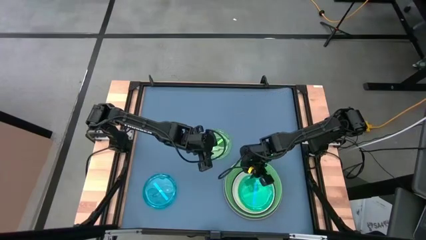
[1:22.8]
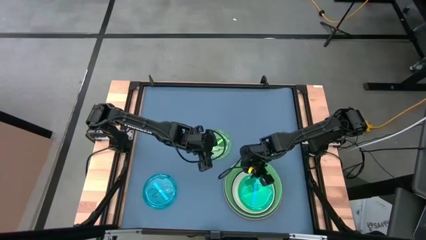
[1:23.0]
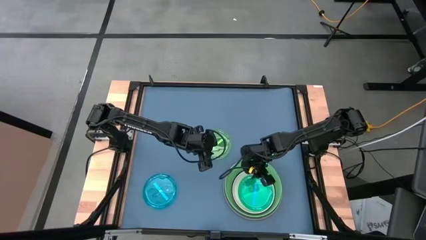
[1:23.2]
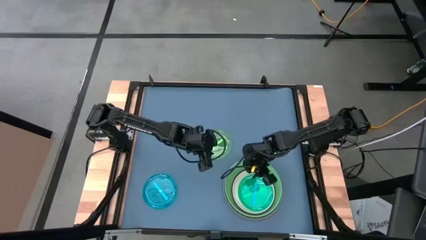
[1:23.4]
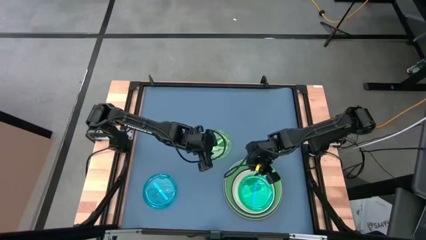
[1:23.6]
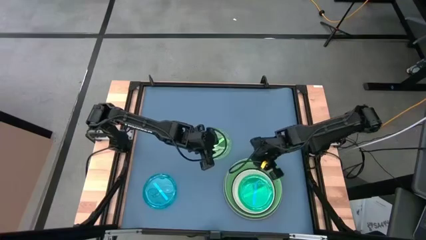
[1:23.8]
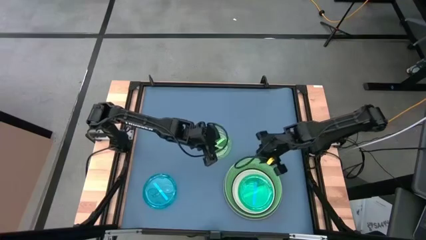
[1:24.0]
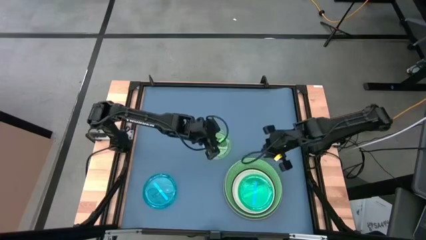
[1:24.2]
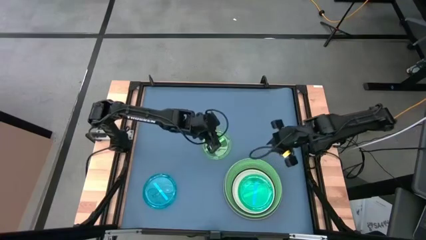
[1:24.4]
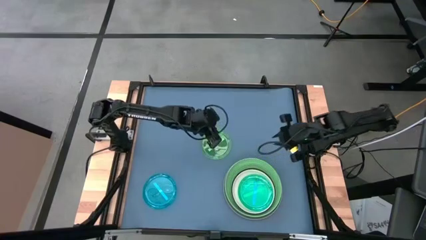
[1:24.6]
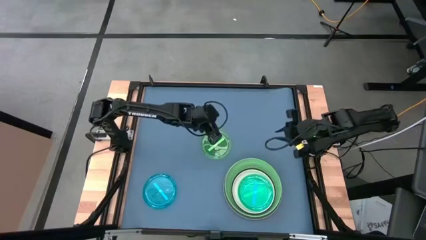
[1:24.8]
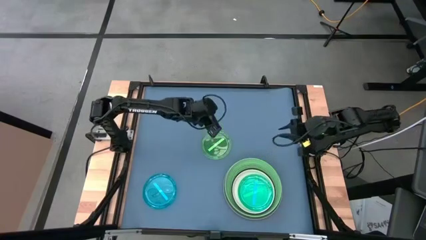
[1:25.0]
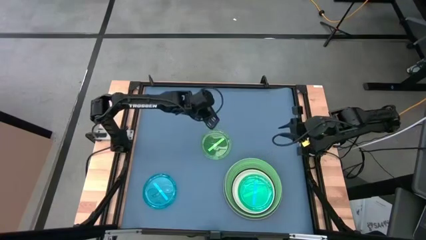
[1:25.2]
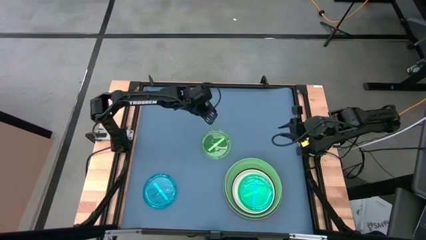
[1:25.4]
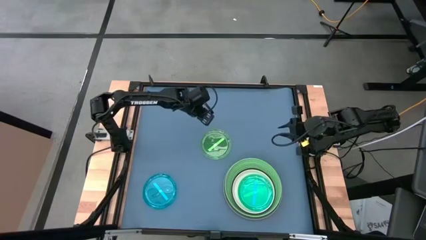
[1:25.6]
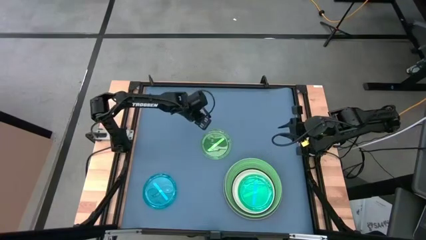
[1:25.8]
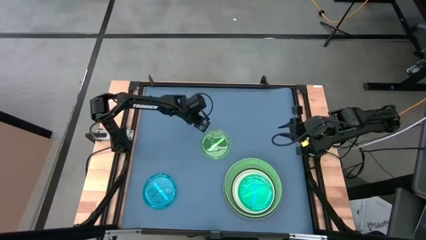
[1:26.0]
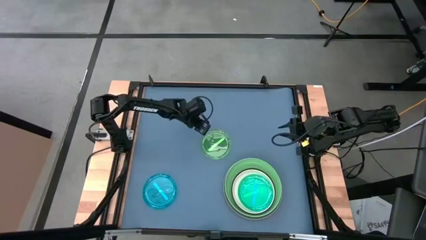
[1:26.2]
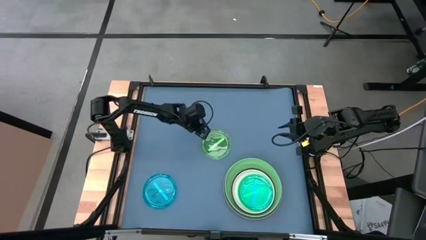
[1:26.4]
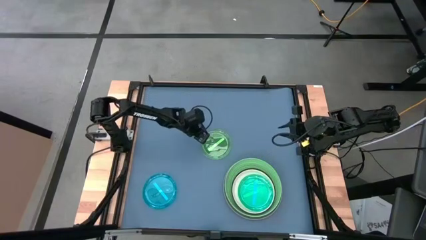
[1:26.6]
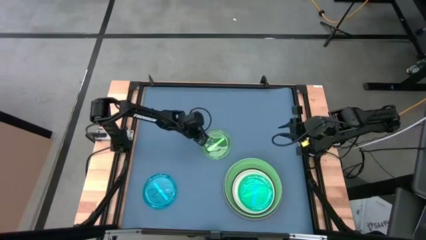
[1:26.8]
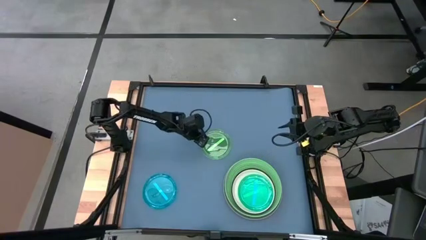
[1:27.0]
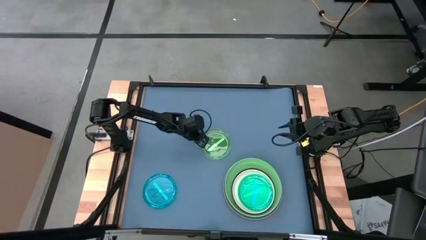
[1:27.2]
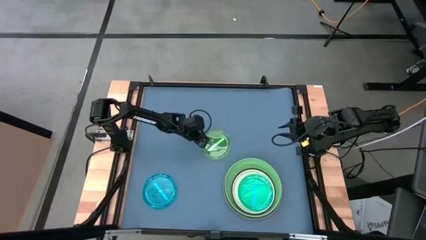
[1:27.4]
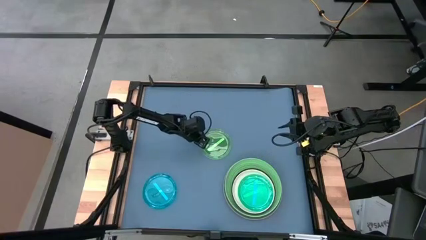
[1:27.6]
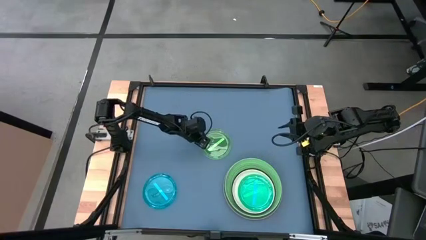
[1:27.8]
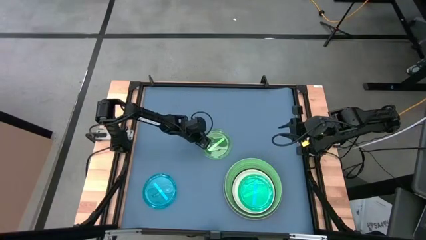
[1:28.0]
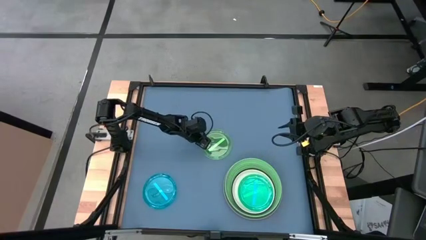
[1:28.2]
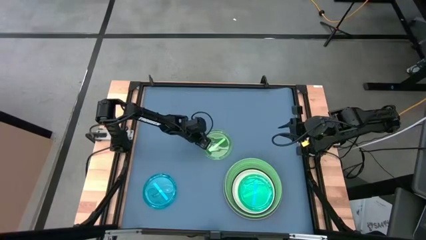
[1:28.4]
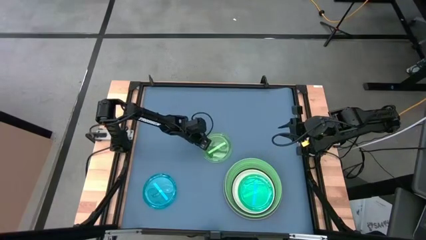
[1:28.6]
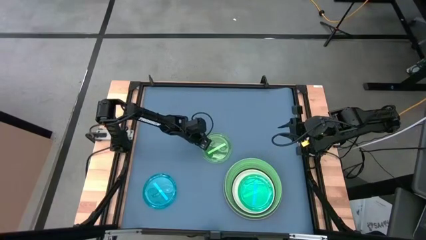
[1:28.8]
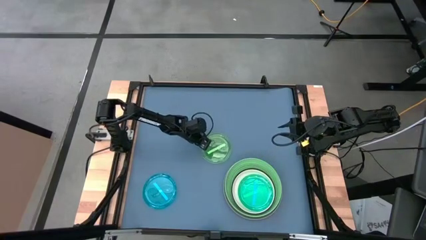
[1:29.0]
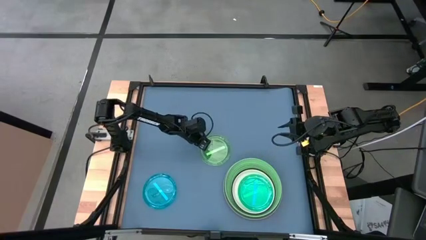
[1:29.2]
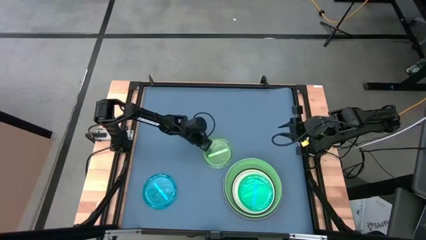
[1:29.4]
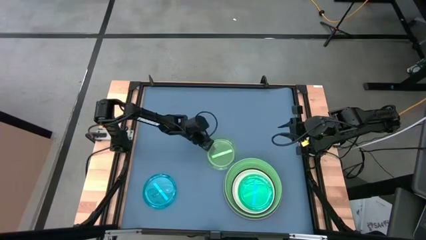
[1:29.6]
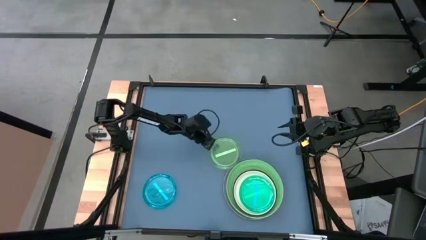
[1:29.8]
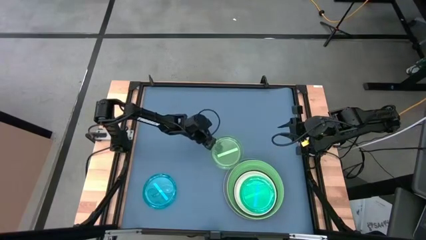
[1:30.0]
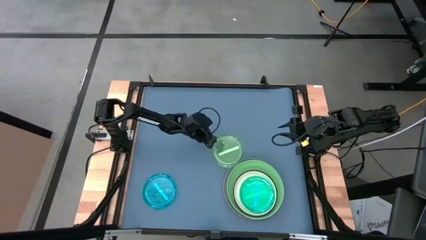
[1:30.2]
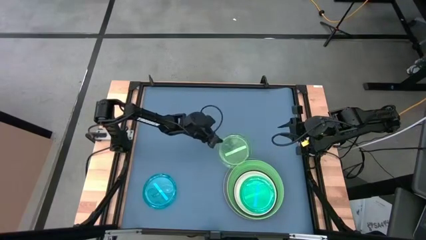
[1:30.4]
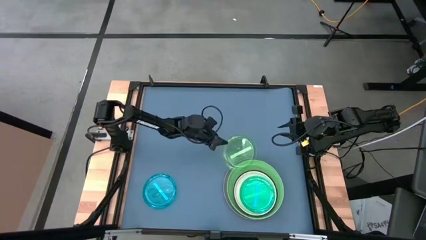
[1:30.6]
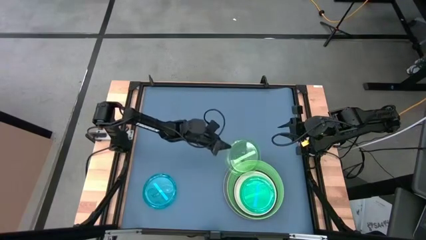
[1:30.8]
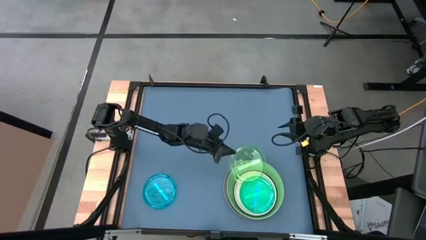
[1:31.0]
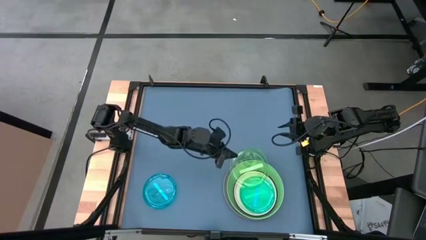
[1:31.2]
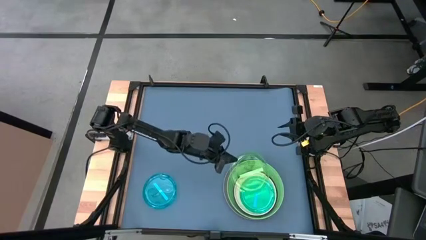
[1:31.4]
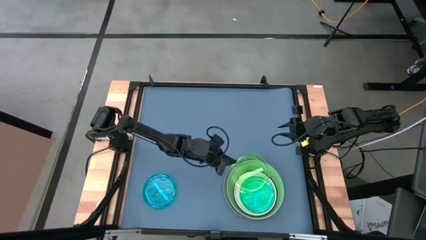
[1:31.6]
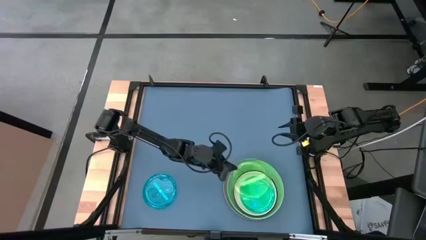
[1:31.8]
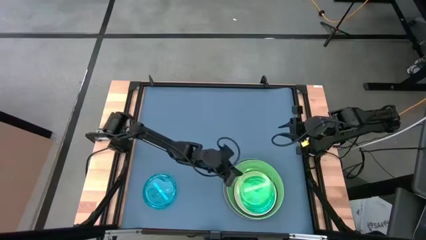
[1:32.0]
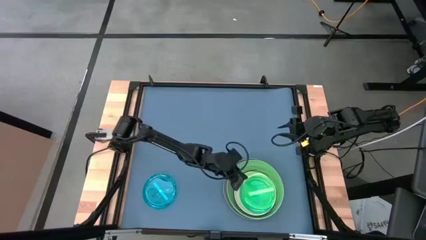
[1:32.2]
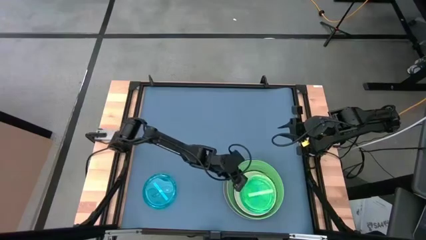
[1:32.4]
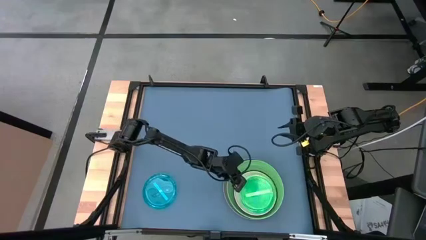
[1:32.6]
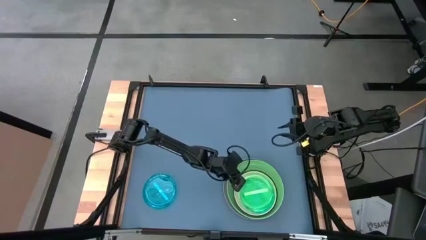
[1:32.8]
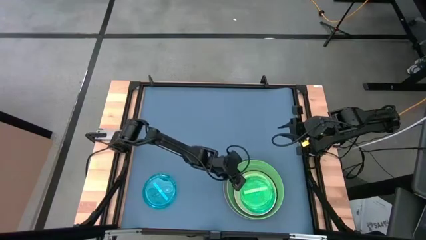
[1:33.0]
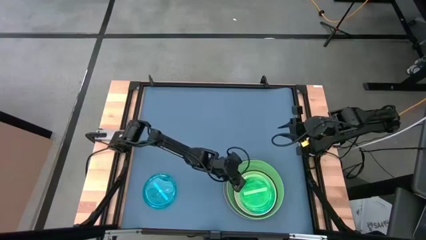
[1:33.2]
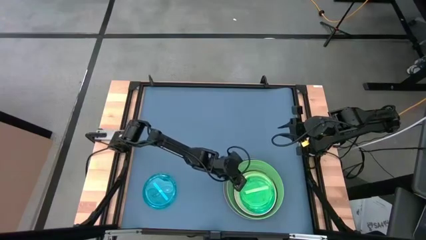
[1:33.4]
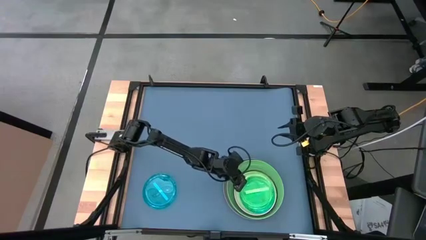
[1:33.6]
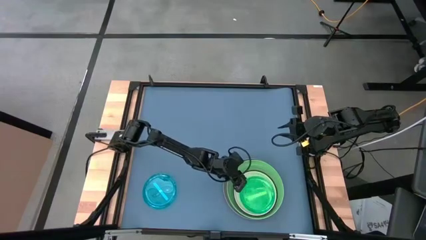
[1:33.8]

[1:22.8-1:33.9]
Task: Stack plastic plates
Stack the small green plate on top of the blue plate

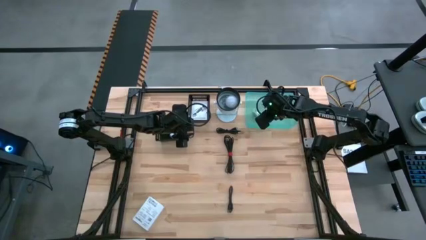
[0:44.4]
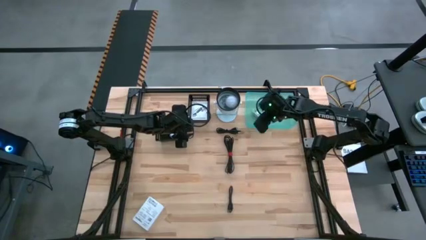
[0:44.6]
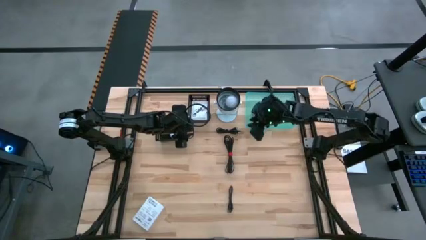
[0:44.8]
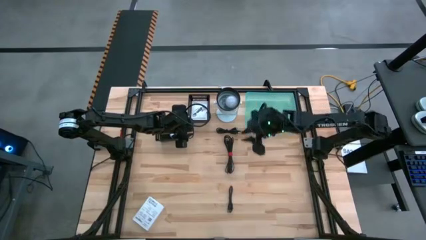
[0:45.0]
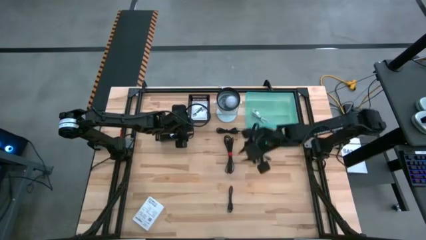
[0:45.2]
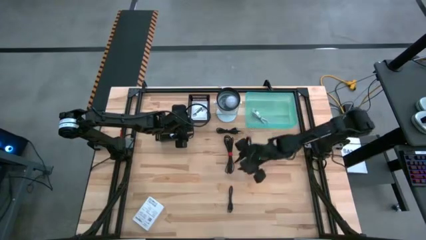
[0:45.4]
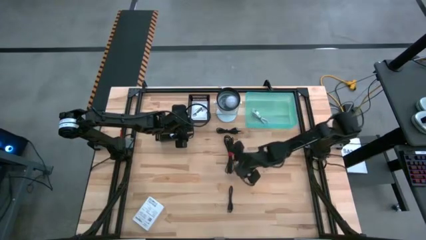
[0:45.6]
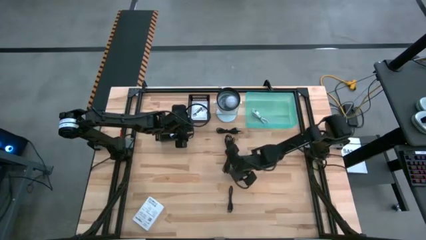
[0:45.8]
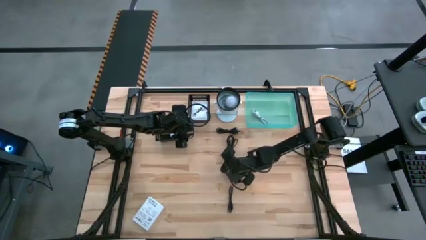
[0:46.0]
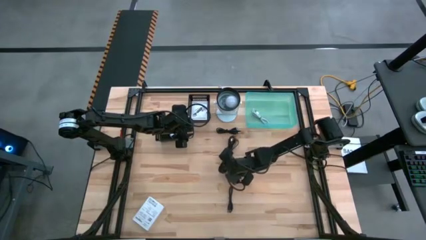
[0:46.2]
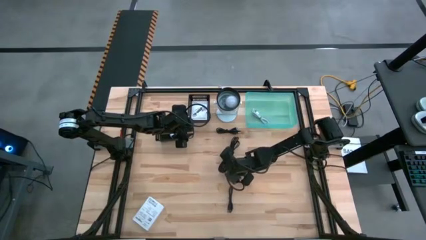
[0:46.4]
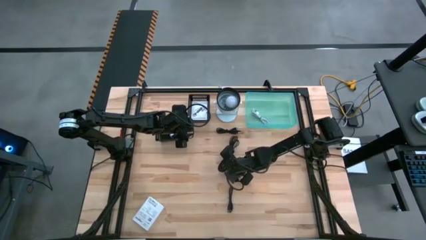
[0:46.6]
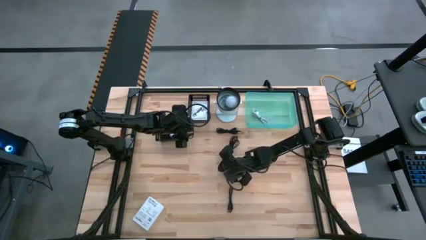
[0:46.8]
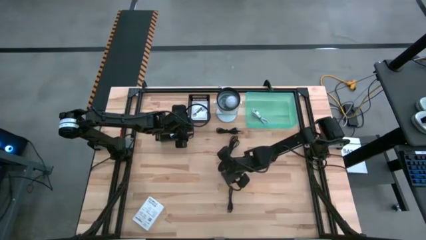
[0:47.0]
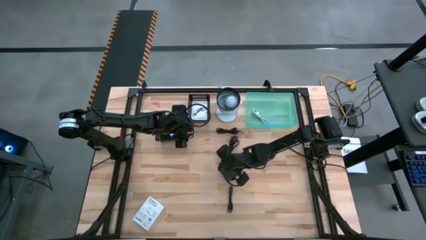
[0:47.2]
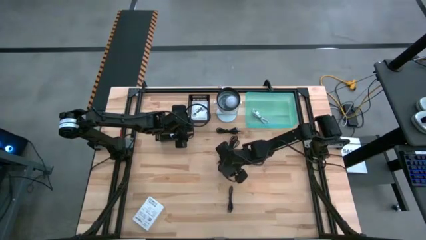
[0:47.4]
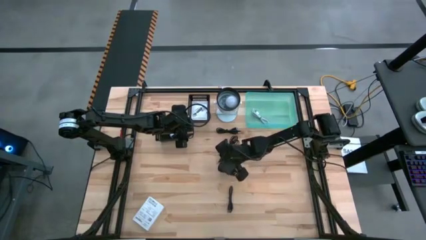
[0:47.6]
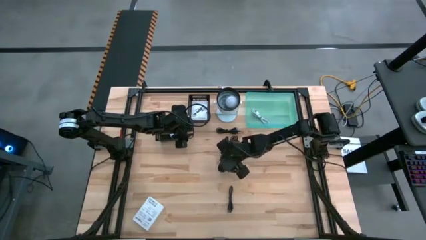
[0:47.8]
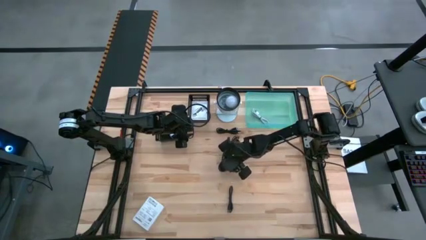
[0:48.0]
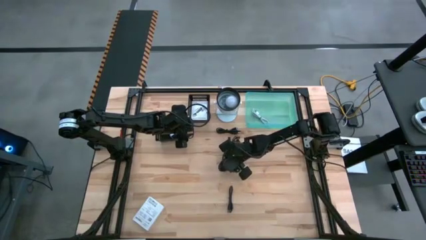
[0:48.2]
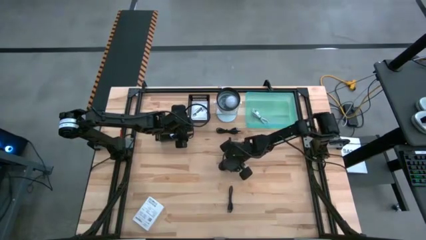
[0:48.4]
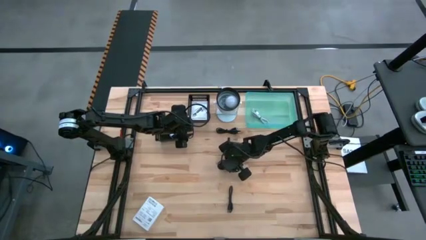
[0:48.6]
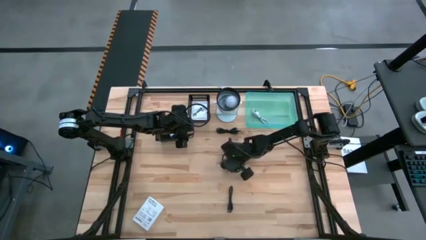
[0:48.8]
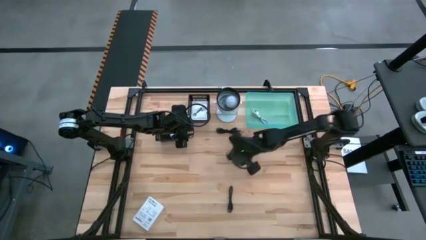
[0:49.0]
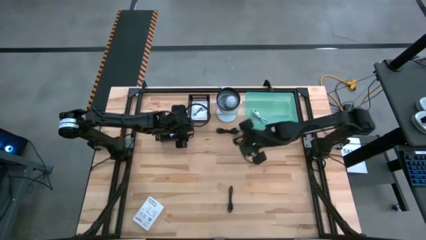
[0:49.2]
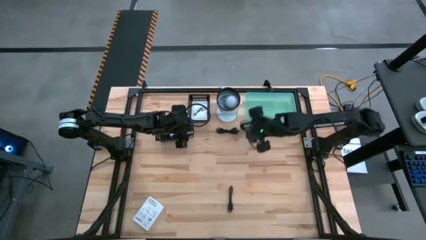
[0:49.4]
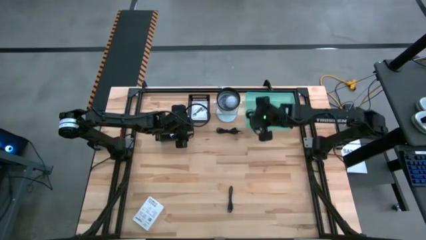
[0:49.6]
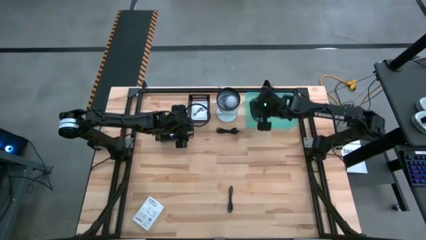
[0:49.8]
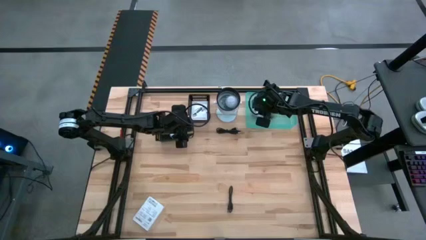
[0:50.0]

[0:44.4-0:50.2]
Task: Pick and place items into bin
Put the middle black charger cable into the light blue bin
